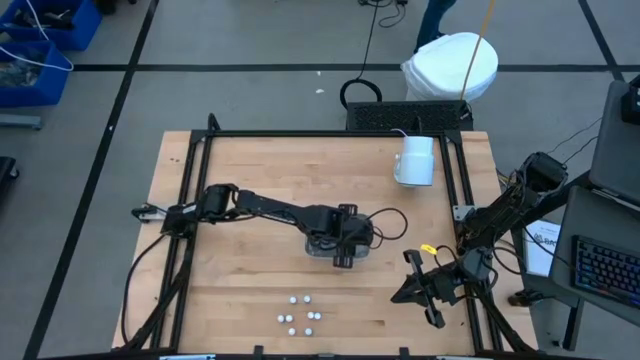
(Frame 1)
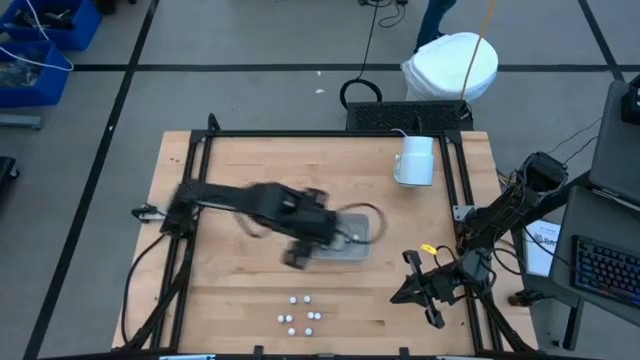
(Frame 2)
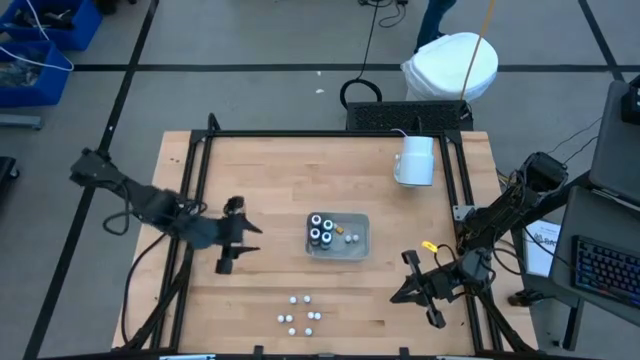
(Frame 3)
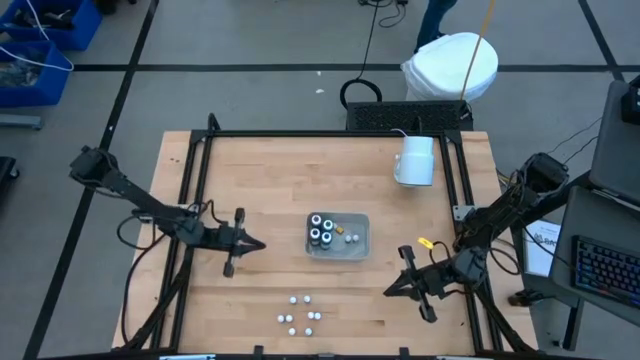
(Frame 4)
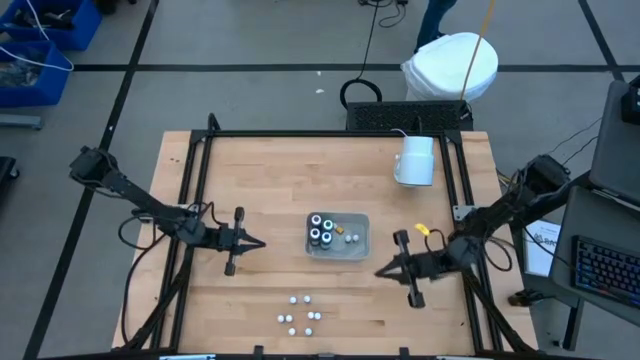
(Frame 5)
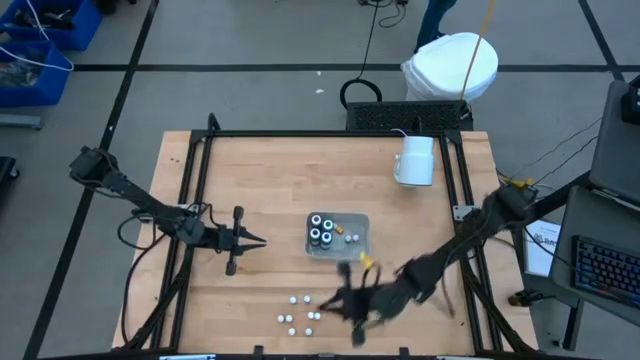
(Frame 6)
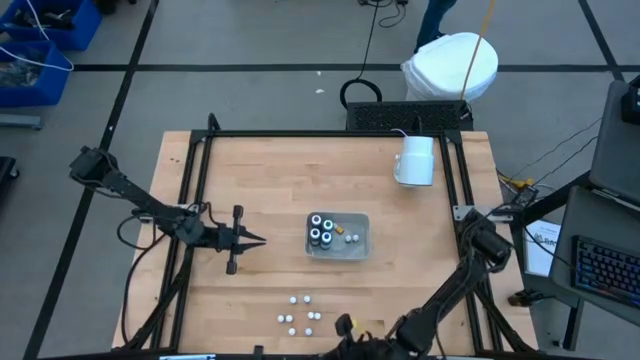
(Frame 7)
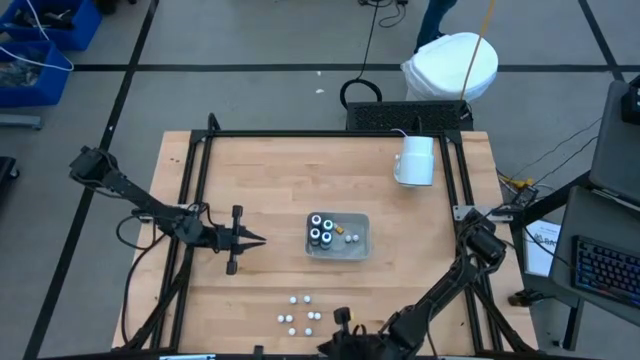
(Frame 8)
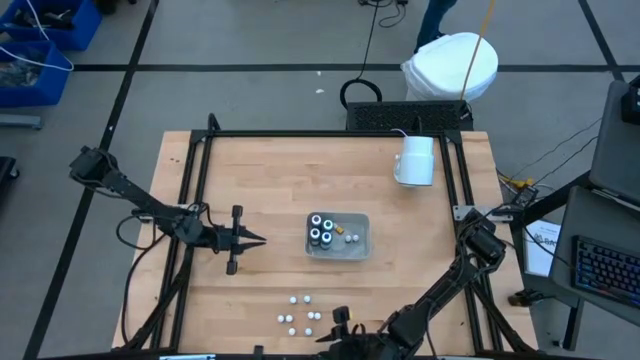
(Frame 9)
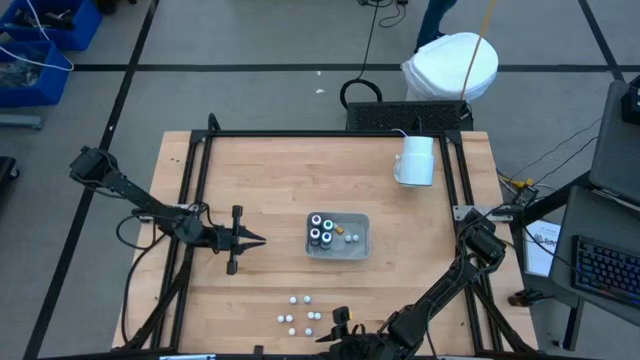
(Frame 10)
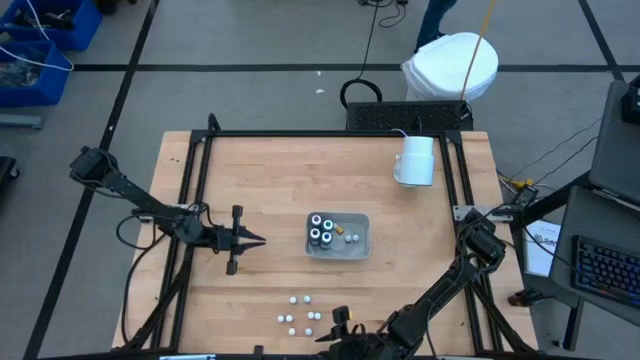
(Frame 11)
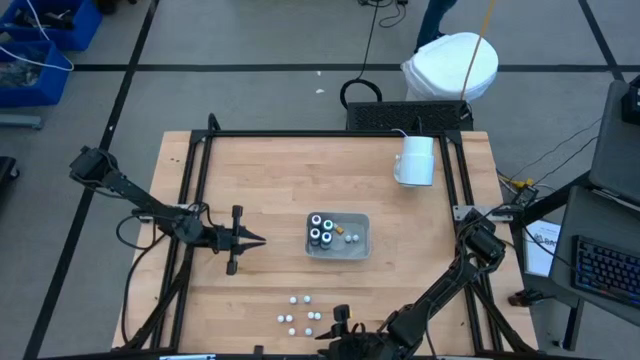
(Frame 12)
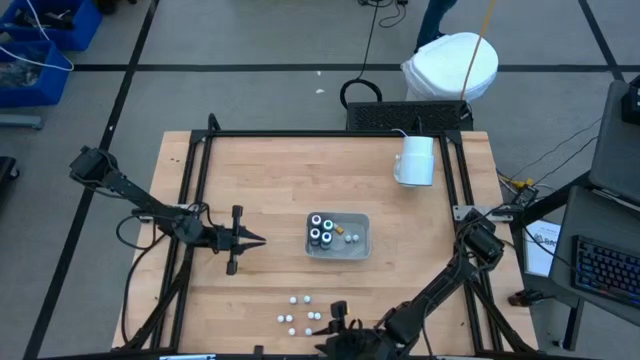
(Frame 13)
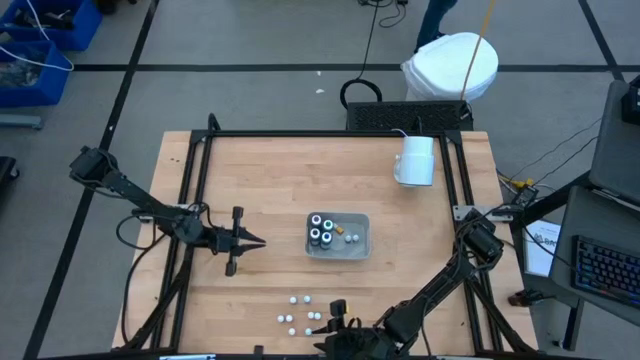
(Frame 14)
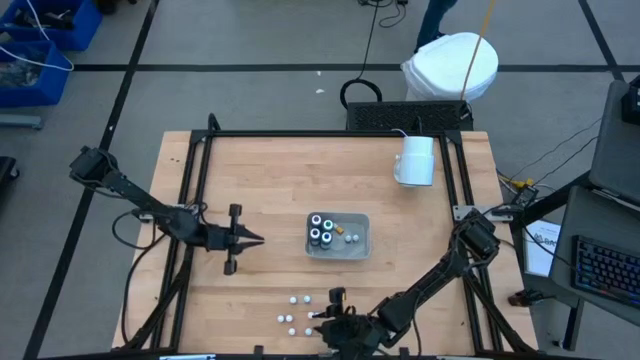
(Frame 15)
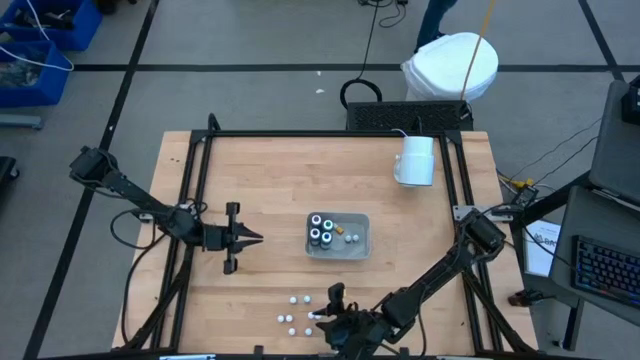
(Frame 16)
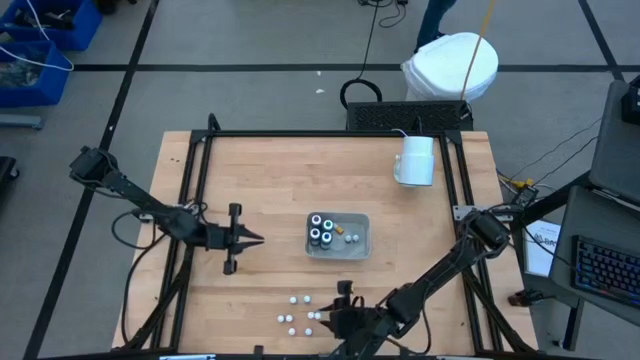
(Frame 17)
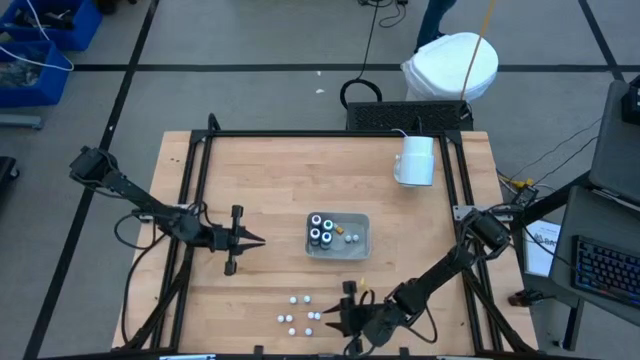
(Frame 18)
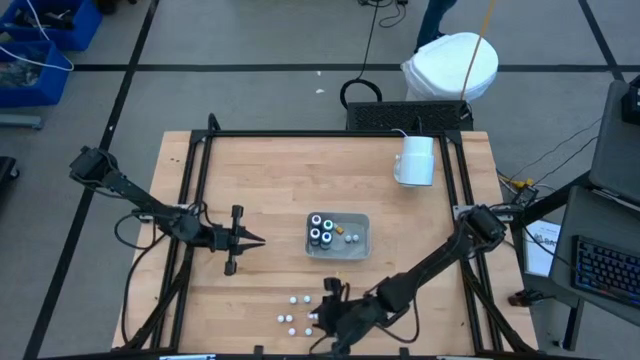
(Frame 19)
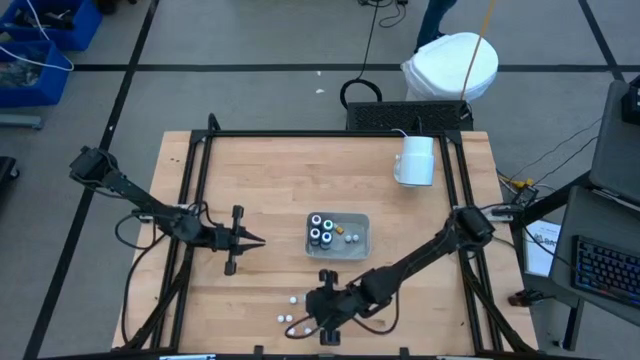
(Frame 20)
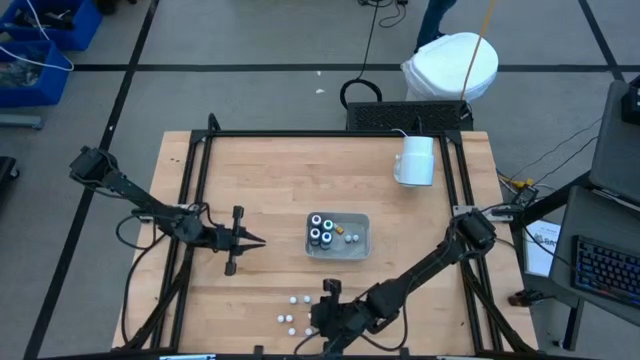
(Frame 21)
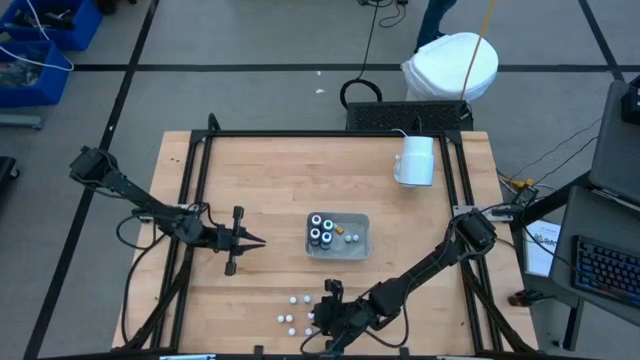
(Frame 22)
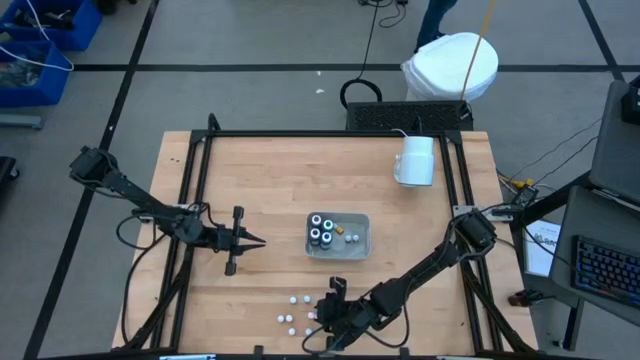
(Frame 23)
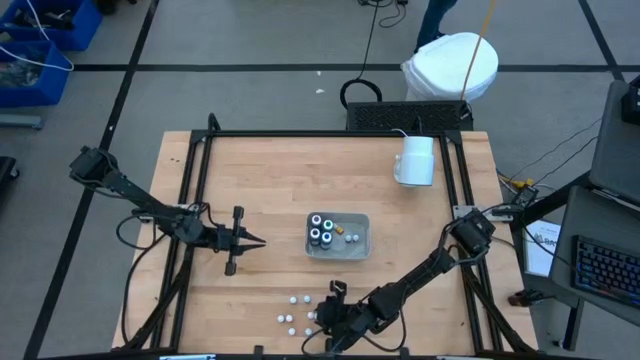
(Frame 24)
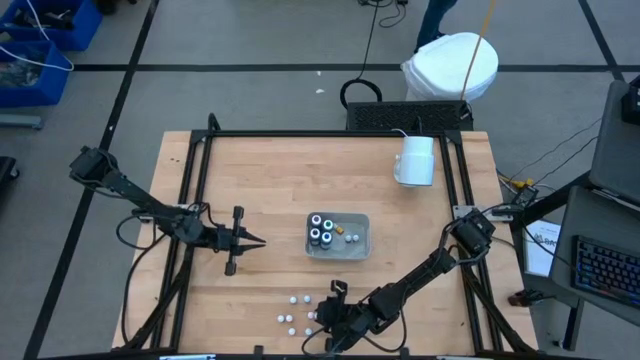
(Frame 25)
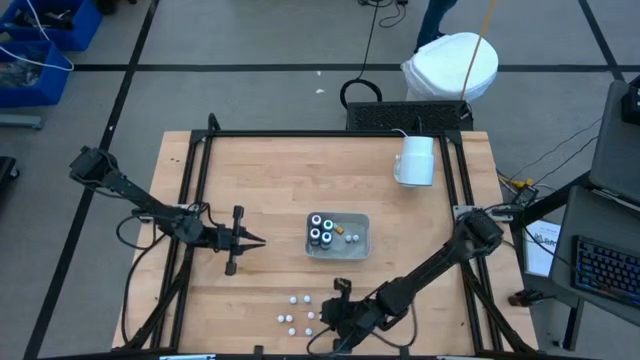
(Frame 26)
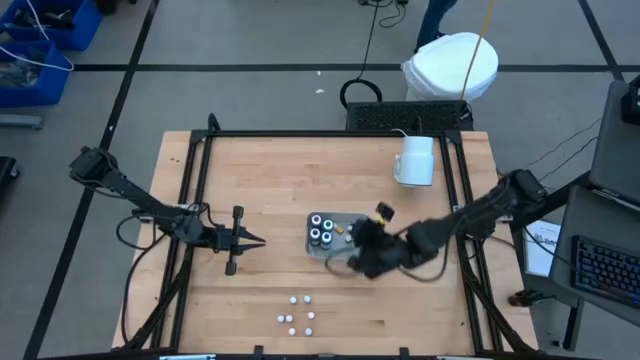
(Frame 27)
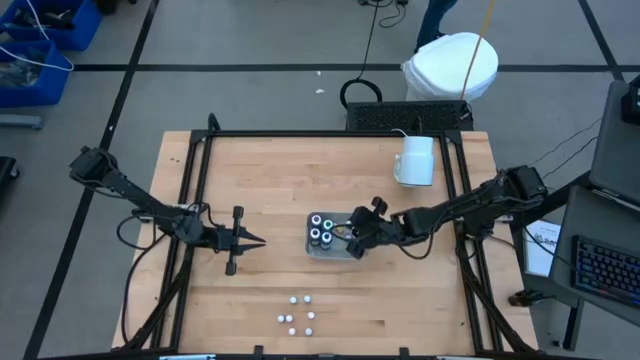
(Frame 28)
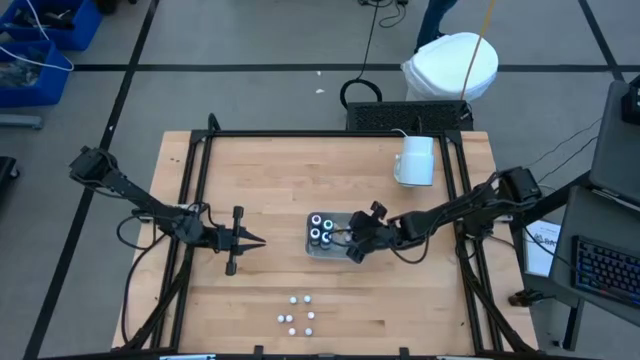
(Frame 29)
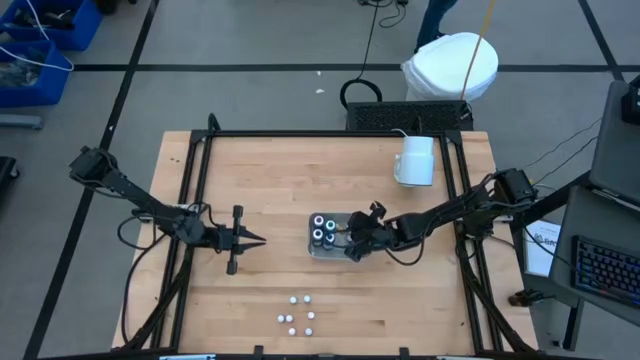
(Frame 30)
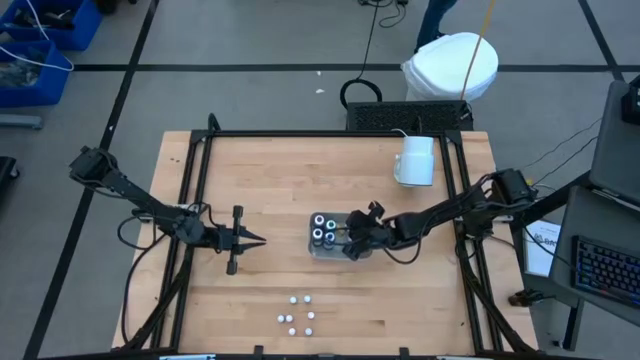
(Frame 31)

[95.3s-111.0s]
Task: Pick & Place food coloring
Put the small red food coloring into the gray bin

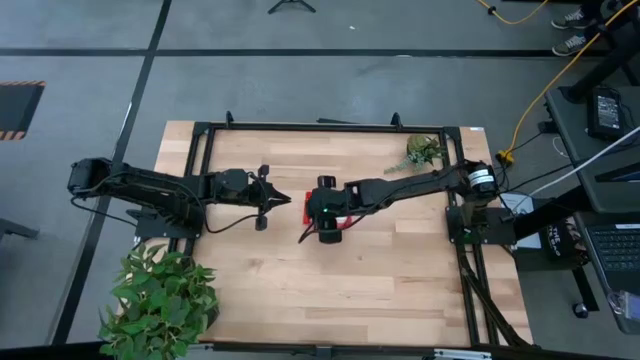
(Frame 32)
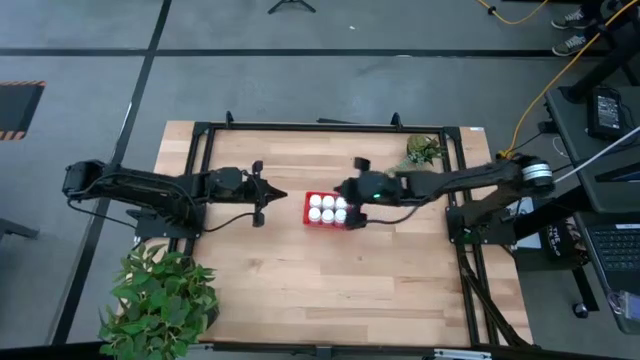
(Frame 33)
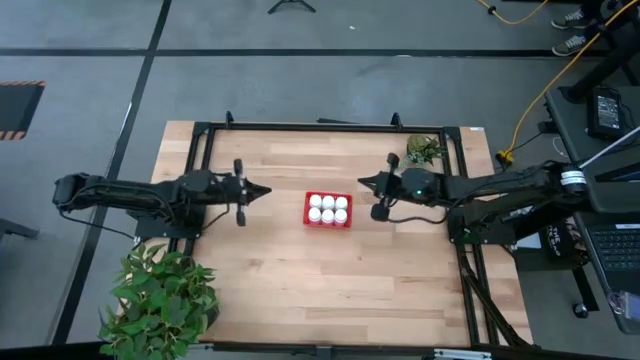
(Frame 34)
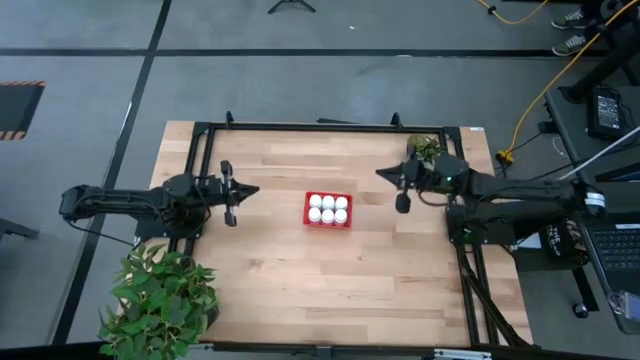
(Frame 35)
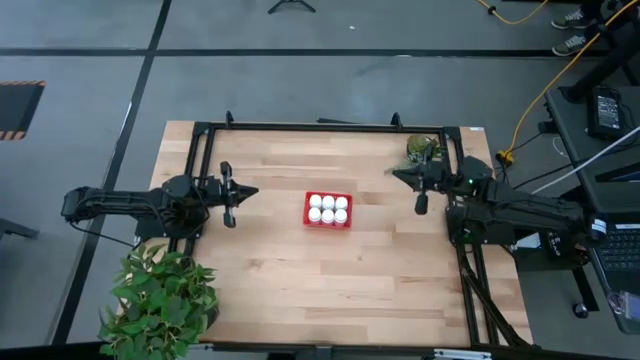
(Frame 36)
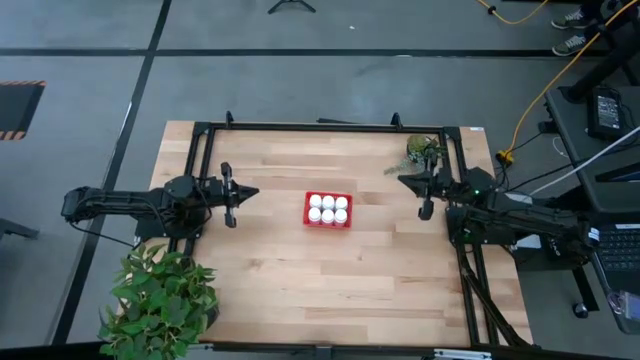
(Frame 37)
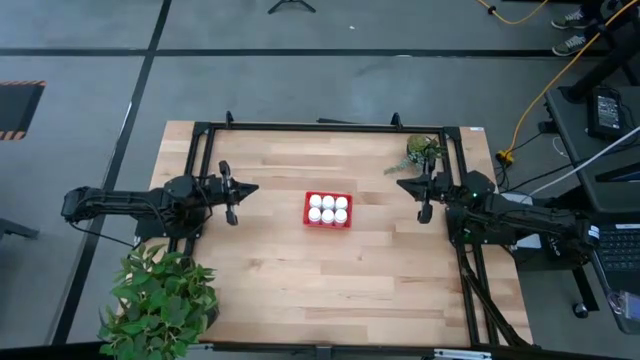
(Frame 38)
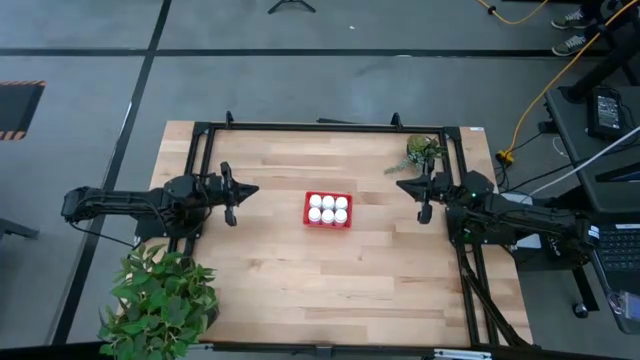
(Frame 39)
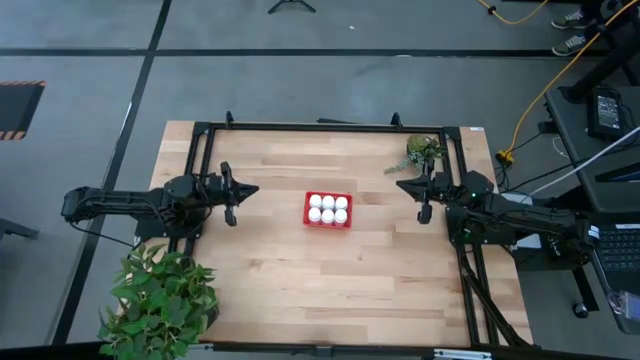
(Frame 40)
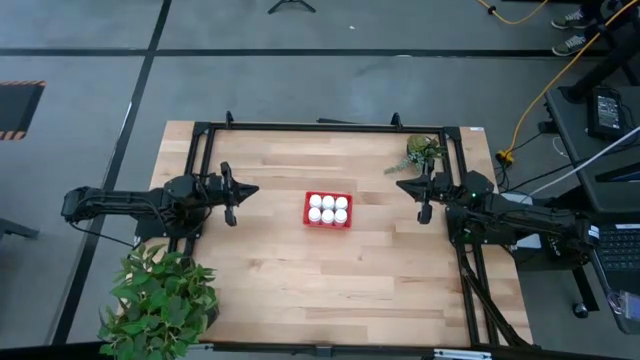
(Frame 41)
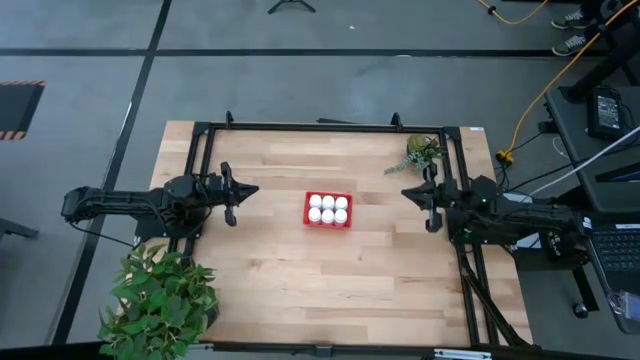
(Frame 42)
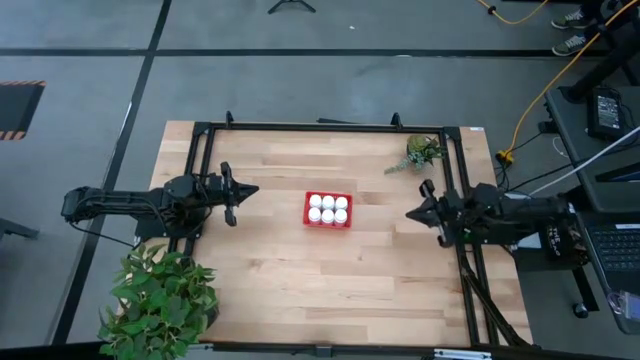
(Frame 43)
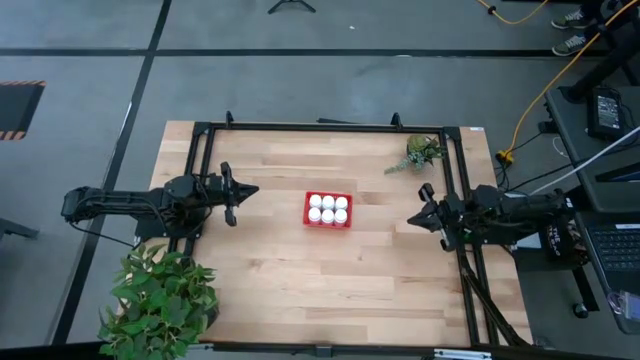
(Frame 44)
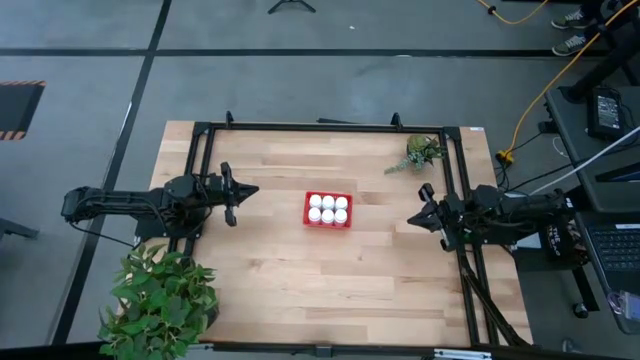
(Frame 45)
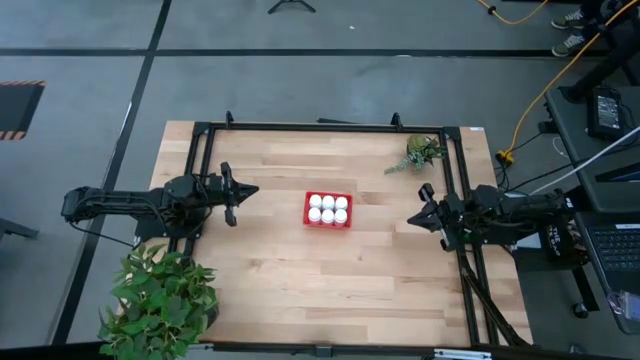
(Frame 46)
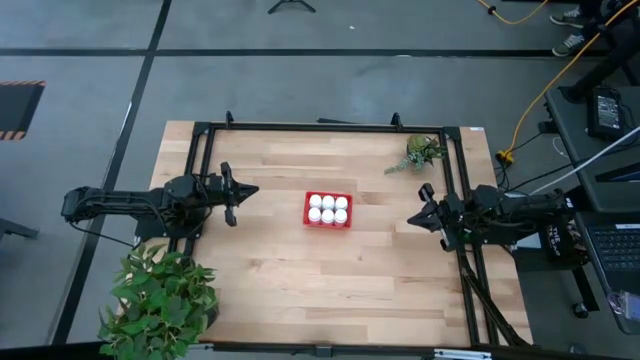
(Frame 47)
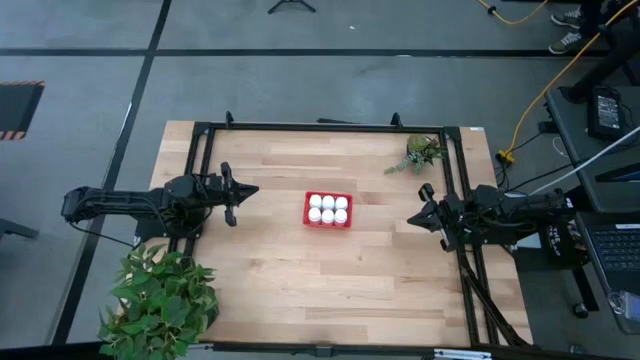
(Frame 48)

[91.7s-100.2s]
Task: Pick and place pill bottles into a basket
Return to Home Position
